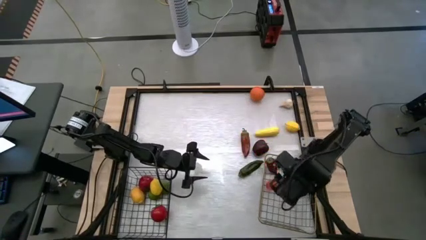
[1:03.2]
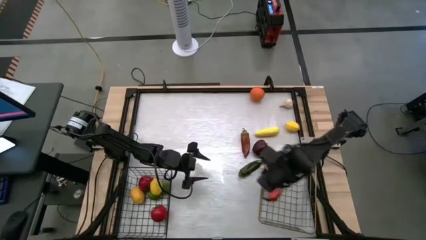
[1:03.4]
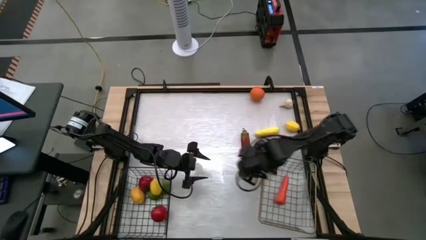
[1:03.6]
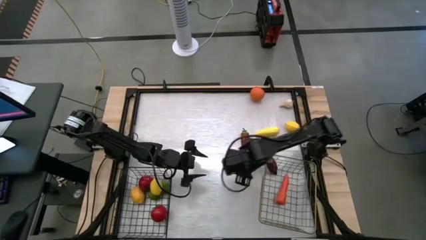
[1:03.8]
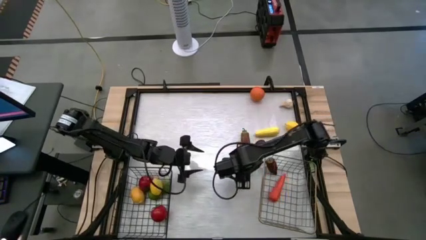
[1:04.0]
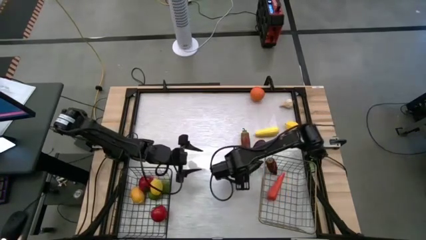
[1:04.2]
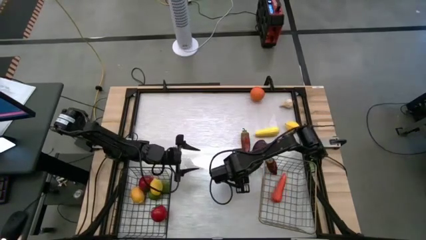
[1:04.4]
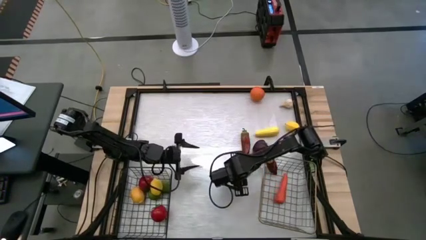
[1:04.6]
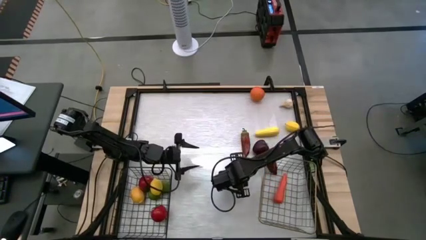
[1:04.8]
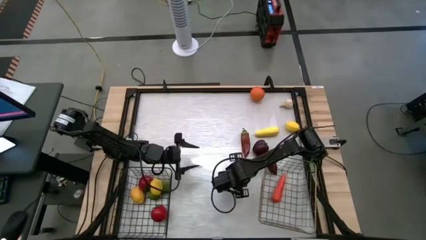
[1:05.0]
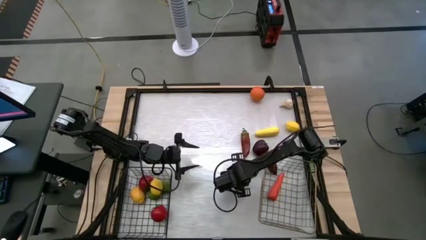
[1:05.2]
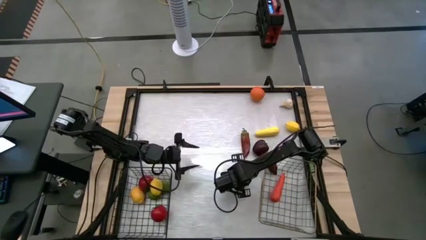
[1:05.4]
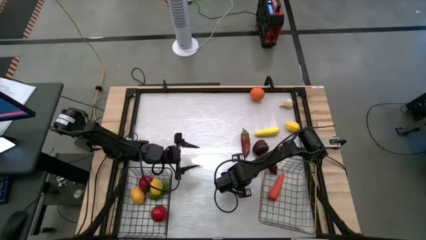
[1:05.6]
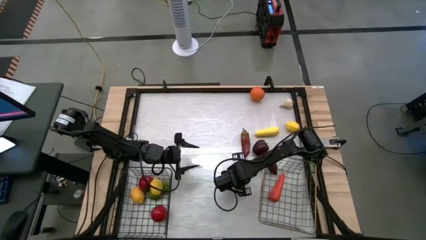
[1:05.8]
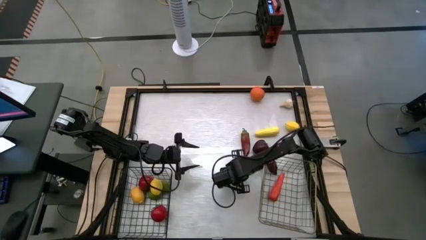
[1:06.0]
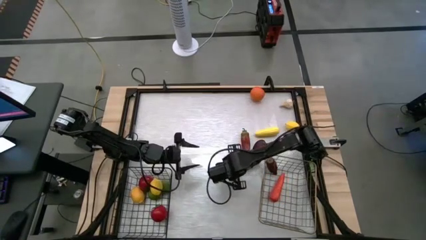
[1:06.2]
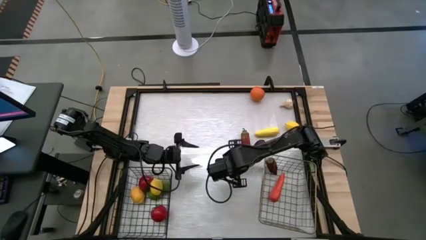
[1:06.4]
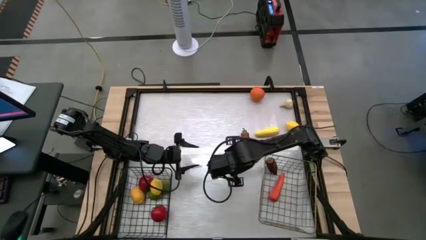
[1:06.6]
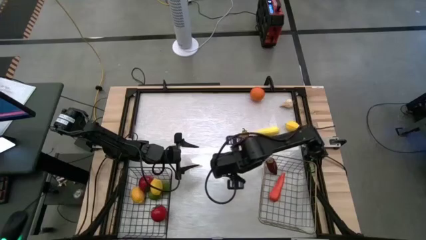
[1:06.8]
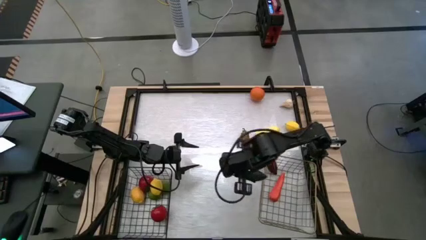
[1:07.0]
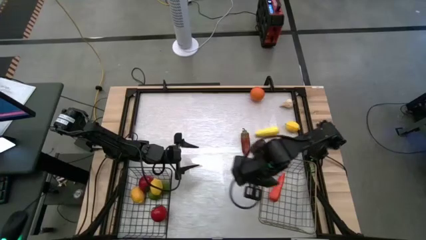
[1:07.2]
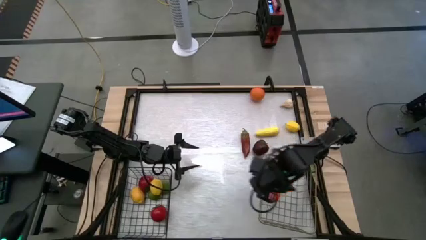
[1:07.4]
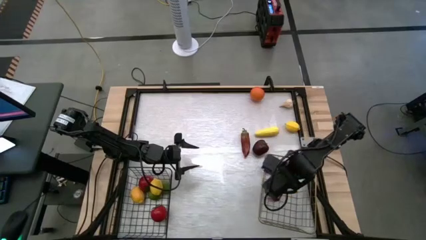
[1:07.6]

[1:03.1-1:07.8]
Task: Sort produce into baskets
Put the green chili pepper into the gold wire basket

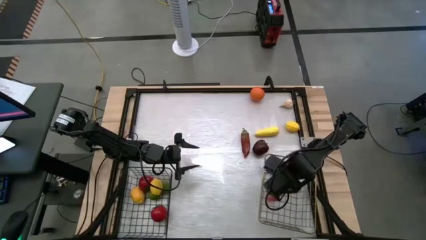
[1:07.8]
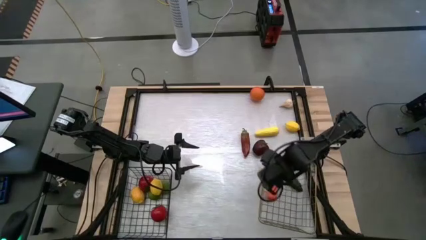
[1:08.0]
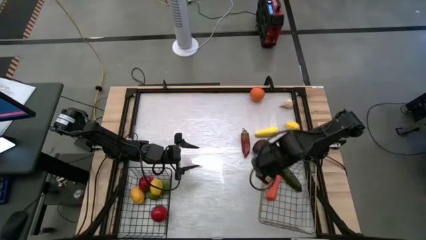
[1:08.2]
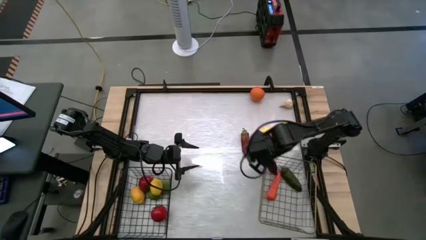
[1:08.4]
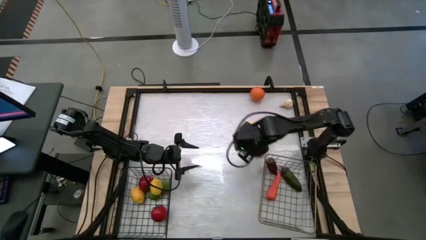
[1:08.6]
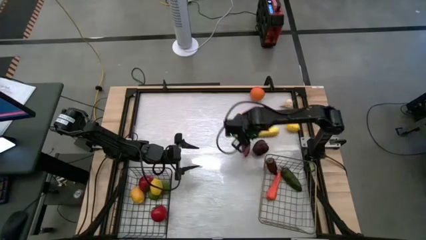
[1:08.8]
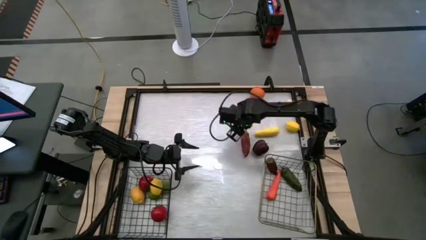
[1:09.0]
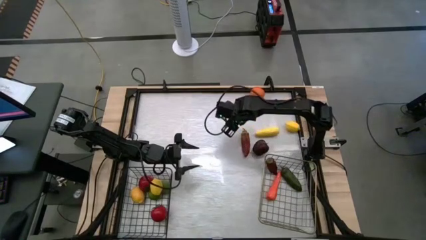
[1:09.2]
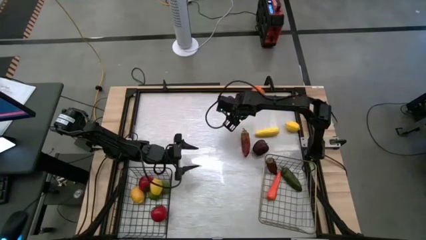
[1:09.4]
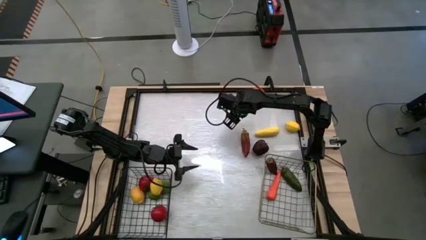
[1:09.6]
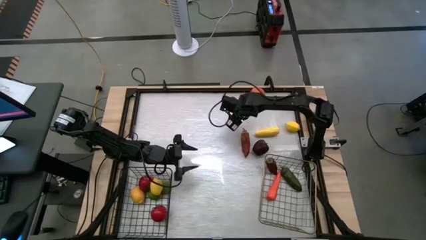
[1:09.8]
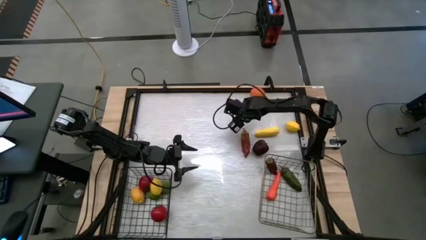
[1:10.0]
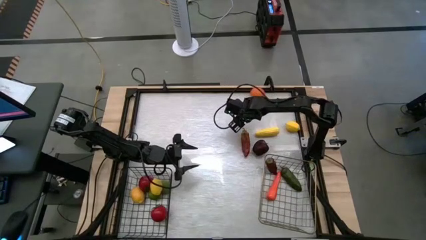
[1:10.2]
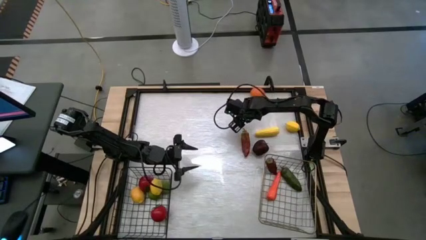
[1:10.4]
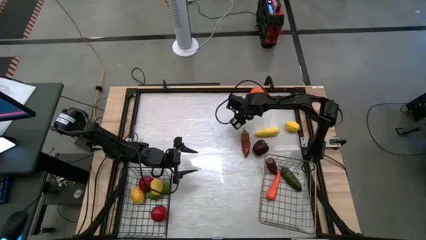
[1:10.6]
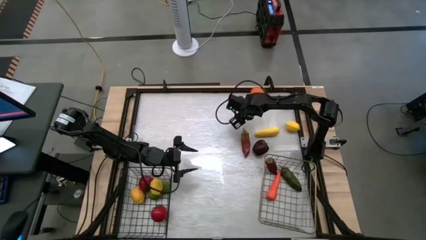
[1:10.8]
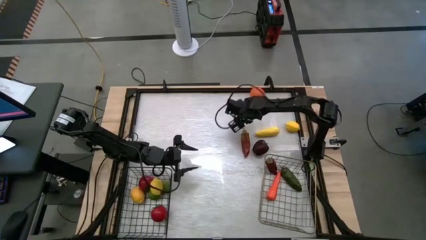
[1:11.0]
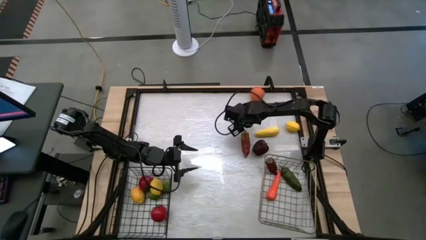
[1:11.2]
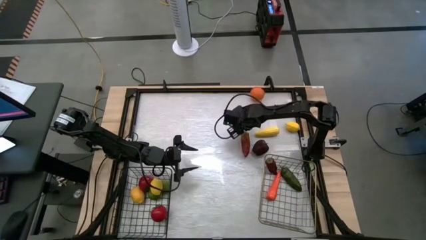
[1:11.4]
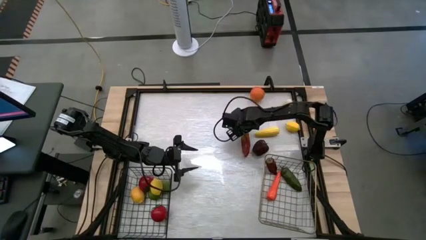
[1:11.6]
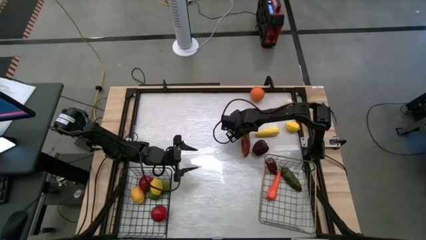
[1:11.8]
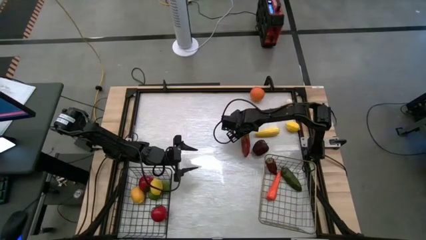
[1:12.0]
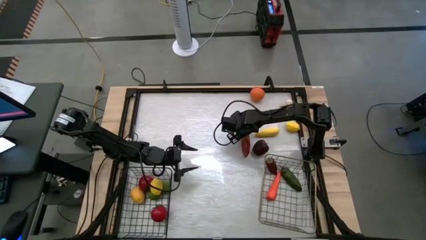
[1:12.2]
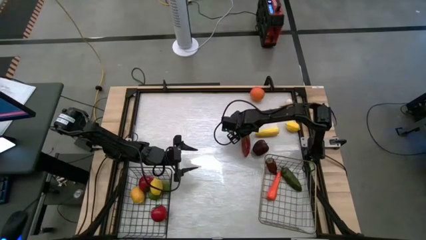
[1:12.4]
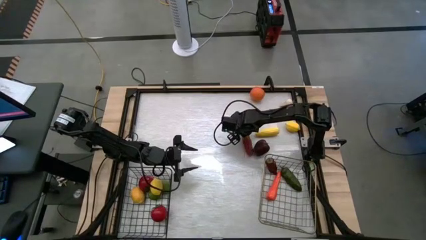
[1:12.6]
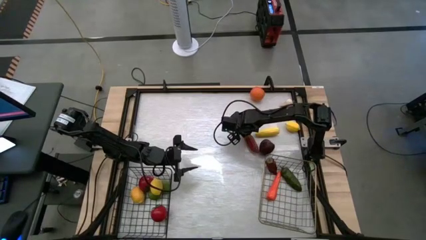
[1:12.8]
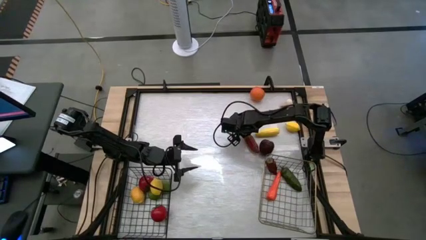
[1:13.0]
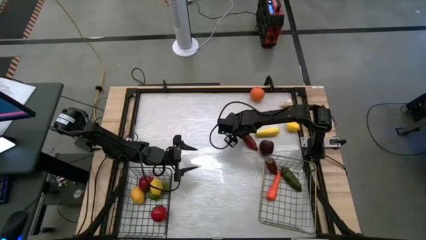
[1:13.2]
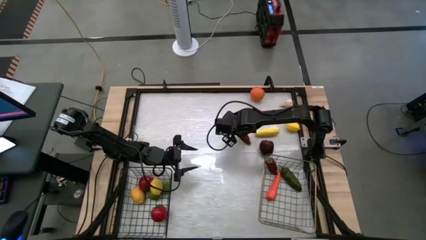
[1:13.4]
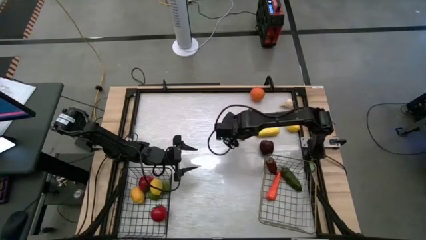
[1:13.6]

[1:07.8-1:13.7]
Put the red chili pepper into the gold wire basket

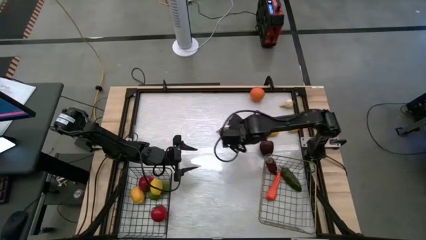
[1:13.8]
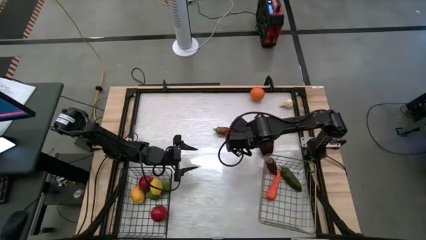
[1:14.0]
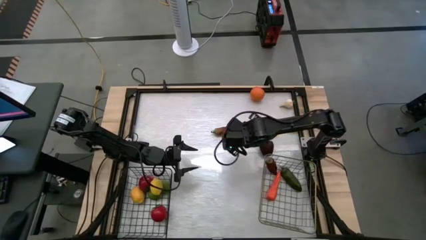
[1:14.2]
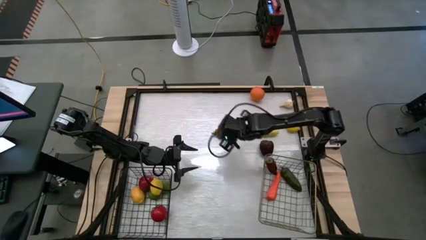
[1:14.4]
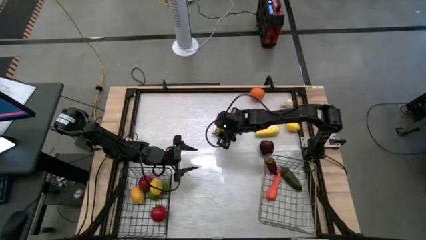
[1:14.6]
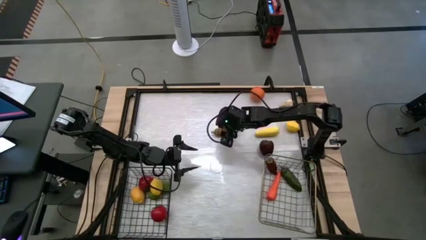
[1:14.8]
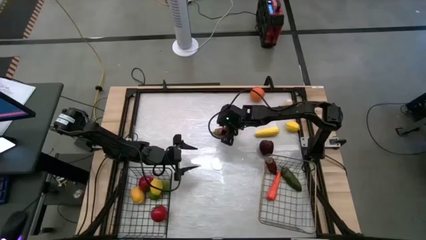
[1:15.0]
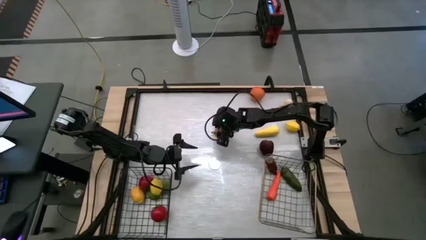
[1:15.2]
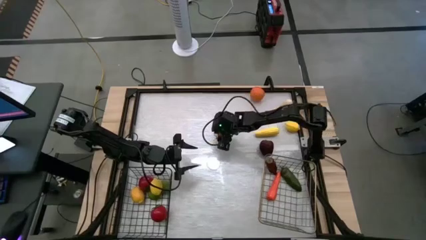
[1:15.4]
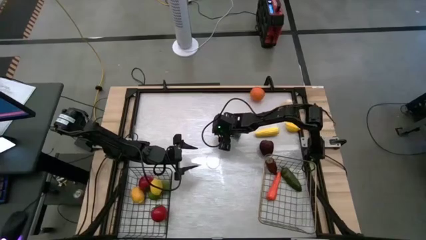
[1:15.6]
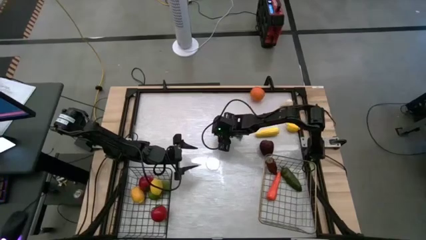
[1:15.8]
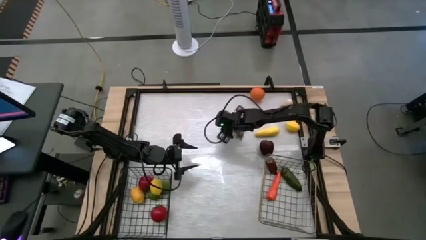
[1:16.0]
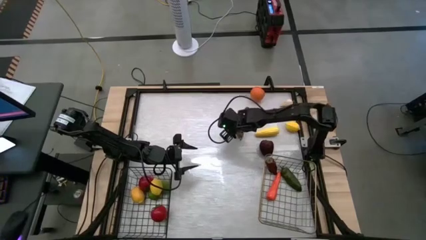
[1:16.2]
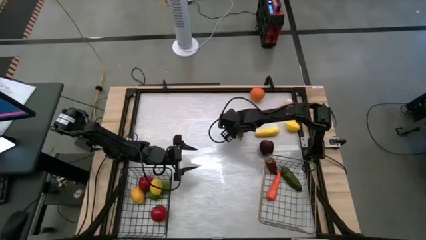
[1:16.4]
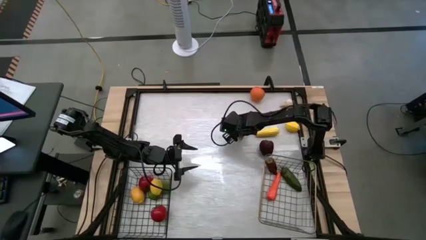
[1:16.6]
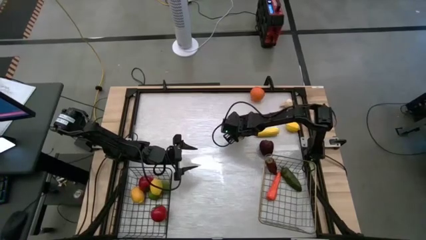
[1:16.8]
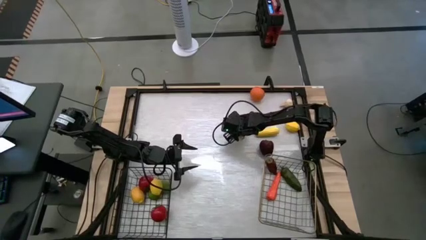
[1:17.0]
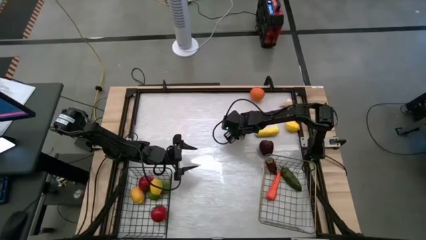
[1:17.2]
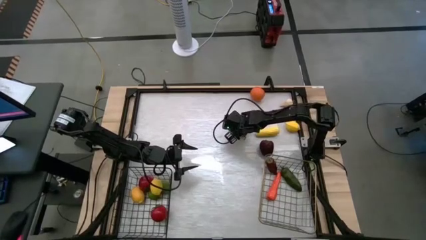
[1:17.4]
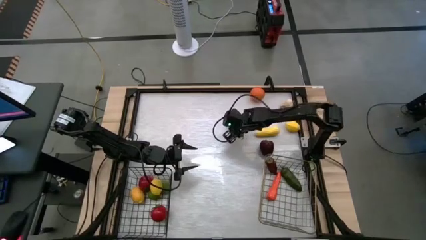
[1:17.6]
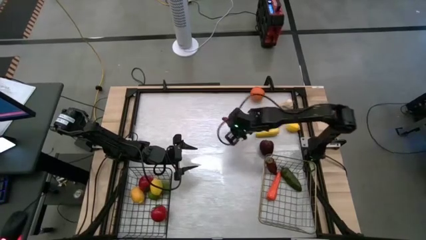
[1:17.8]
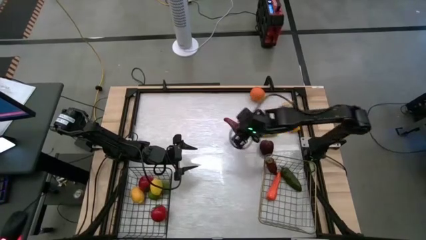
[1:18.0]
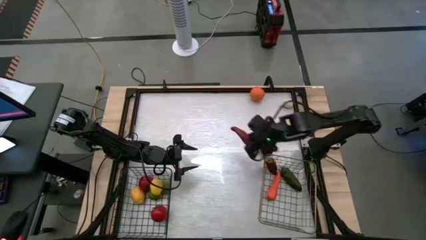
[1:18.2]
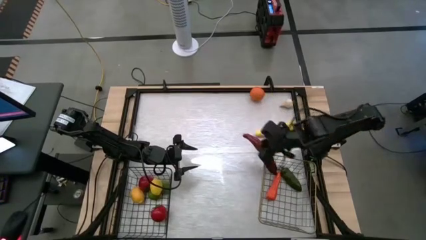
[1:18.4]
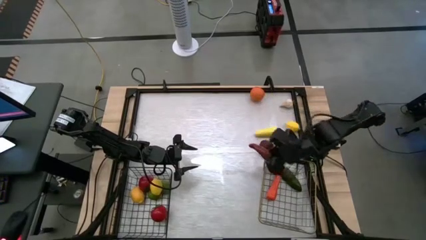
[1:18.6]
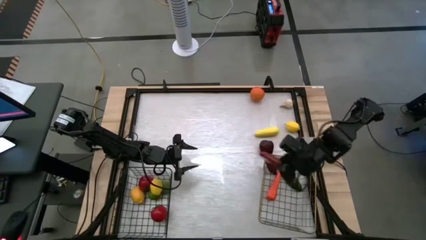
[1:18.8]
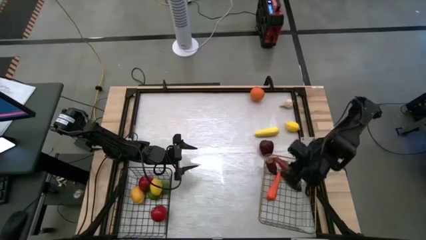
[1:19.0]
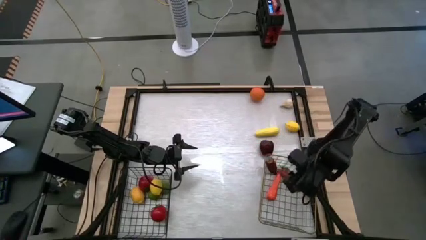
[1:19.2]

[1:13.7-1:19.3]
Put the red chili pepper into the gold wire basket
